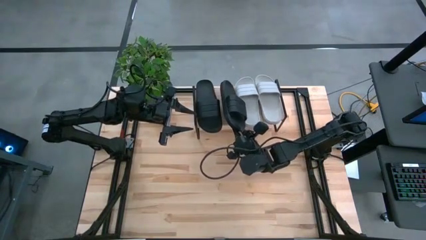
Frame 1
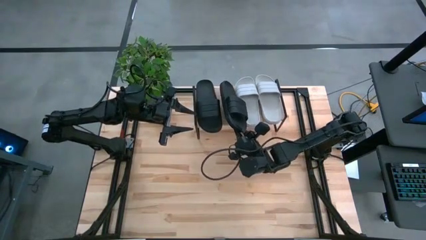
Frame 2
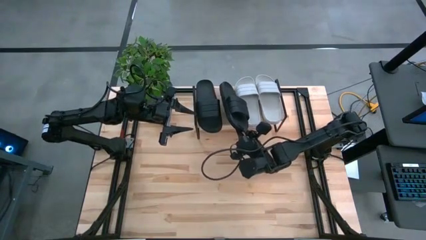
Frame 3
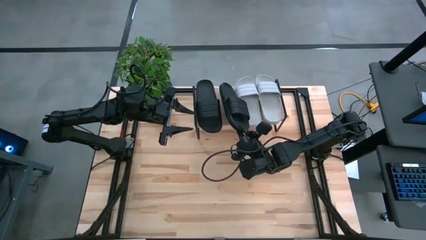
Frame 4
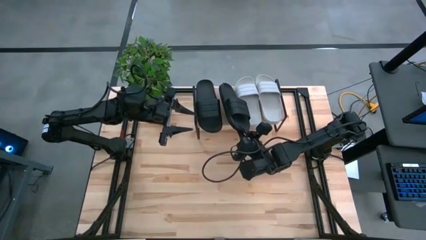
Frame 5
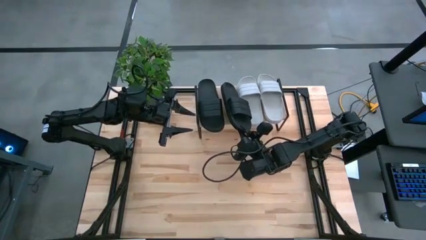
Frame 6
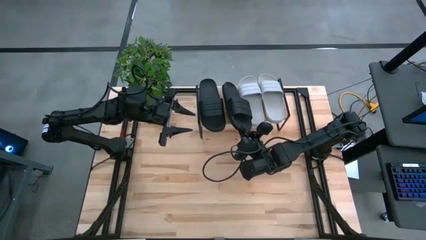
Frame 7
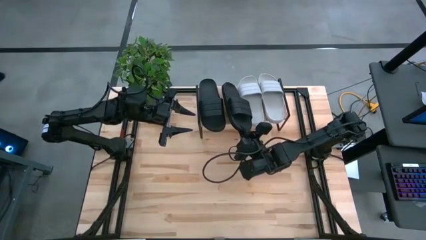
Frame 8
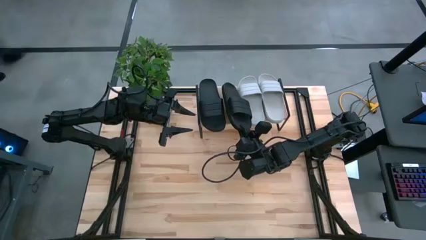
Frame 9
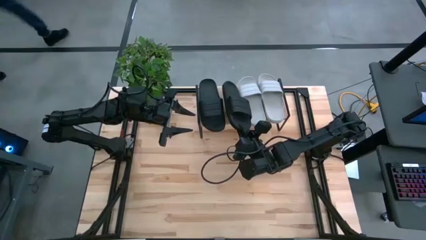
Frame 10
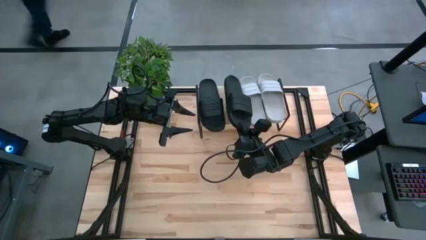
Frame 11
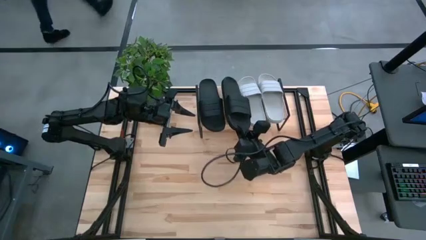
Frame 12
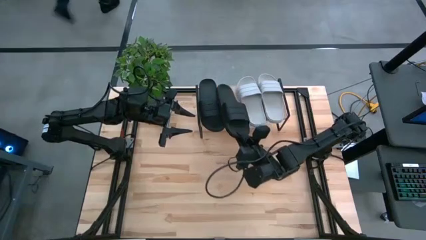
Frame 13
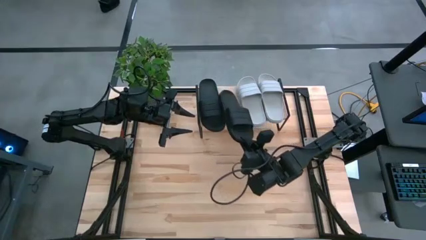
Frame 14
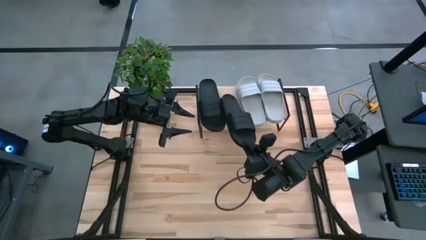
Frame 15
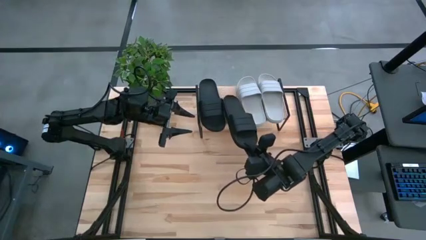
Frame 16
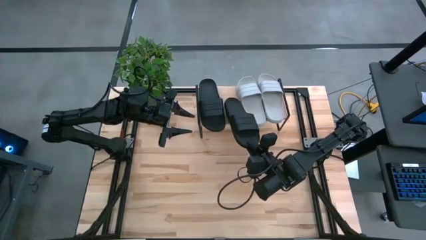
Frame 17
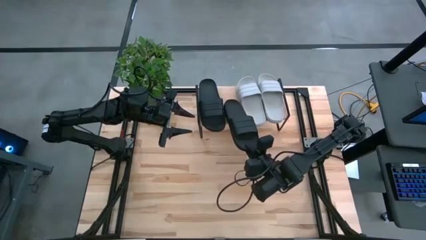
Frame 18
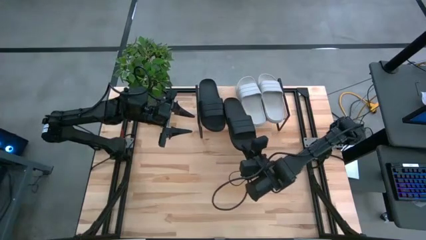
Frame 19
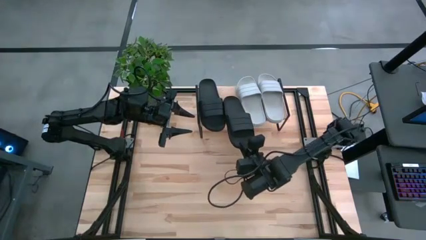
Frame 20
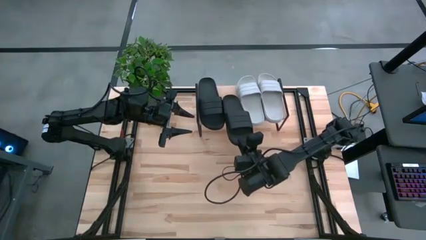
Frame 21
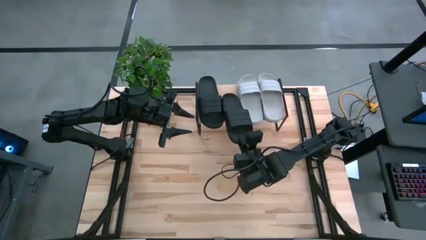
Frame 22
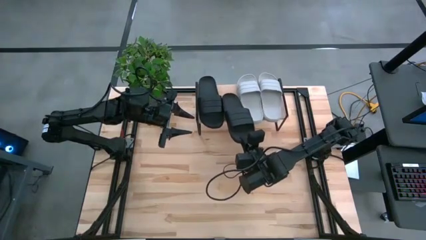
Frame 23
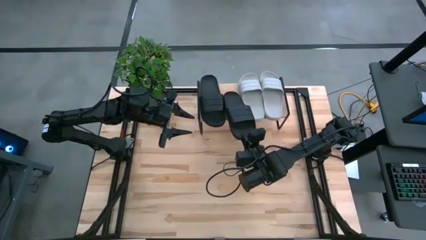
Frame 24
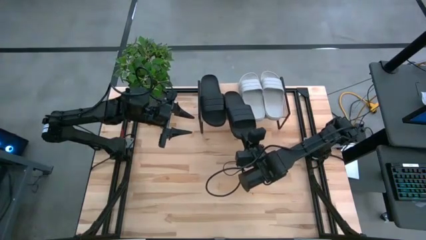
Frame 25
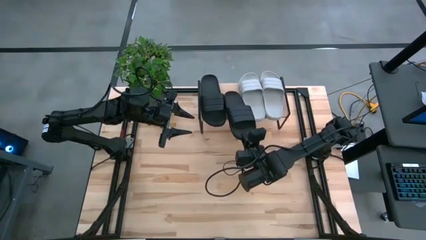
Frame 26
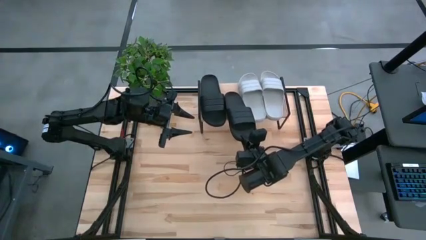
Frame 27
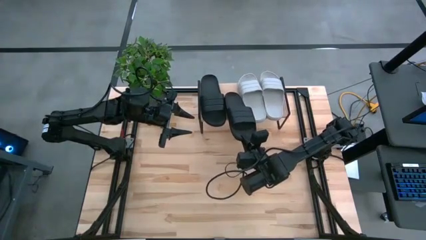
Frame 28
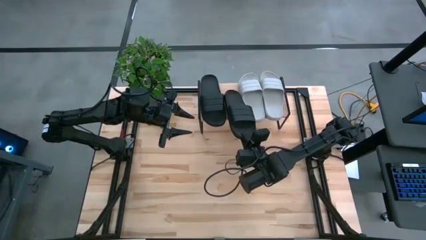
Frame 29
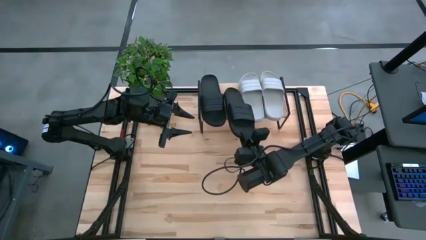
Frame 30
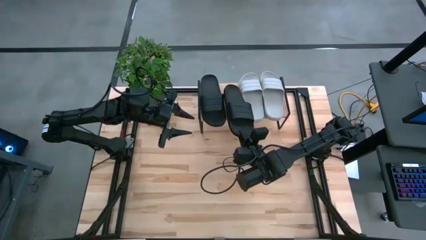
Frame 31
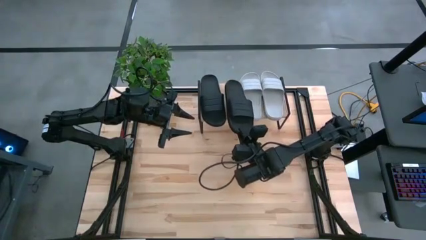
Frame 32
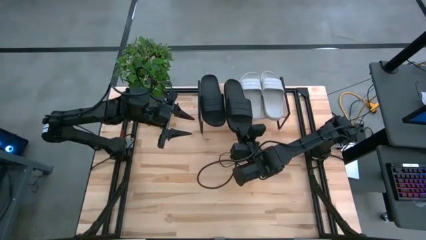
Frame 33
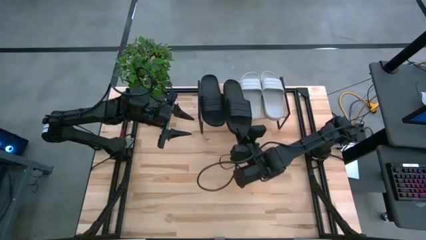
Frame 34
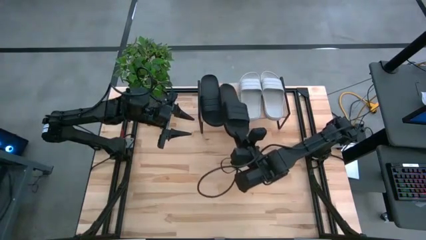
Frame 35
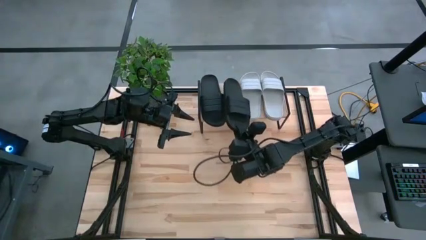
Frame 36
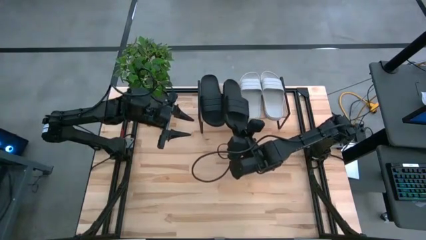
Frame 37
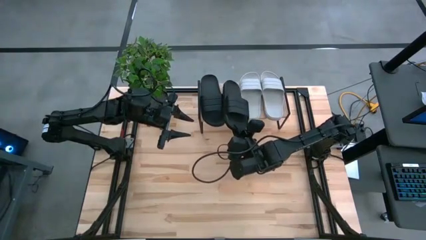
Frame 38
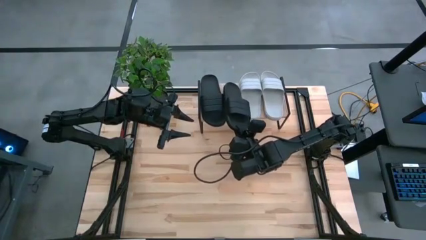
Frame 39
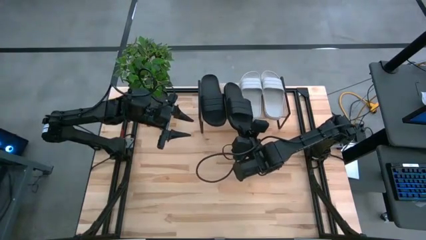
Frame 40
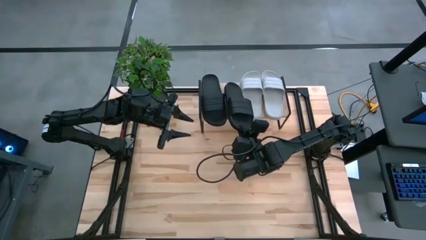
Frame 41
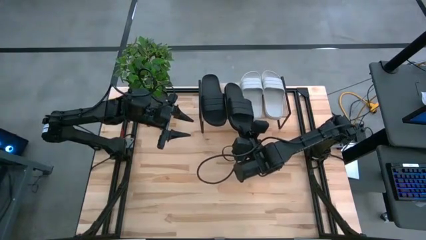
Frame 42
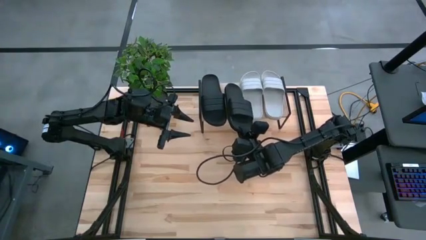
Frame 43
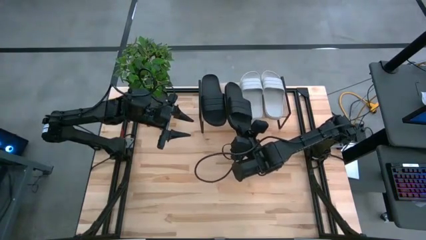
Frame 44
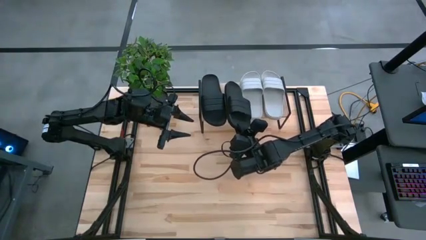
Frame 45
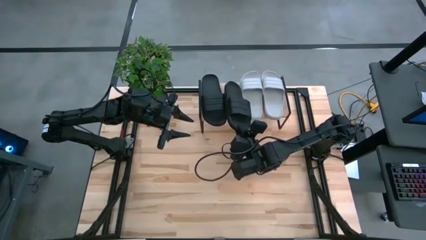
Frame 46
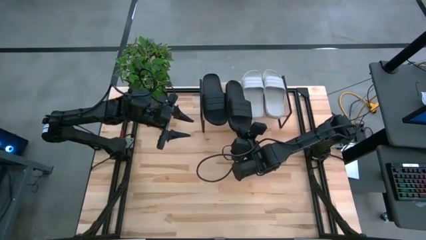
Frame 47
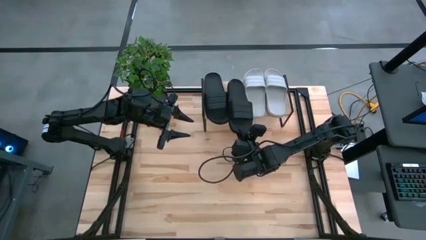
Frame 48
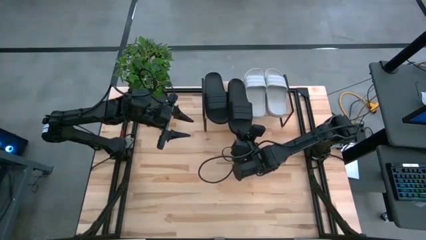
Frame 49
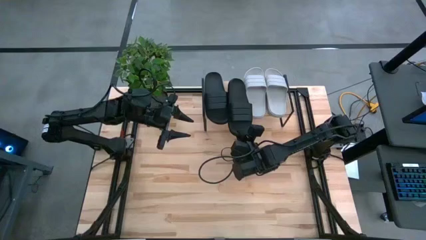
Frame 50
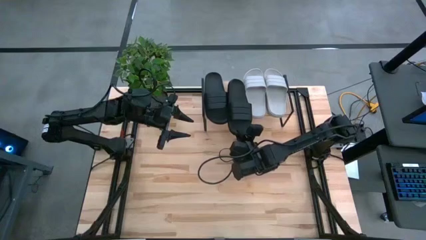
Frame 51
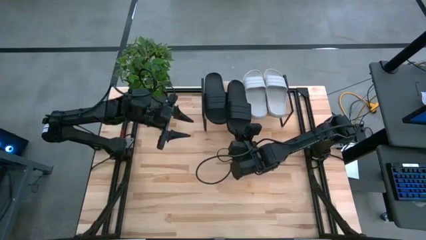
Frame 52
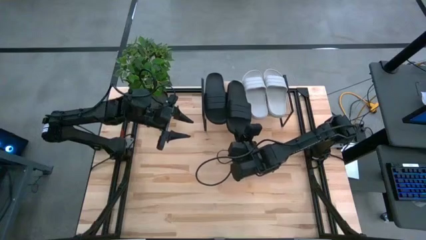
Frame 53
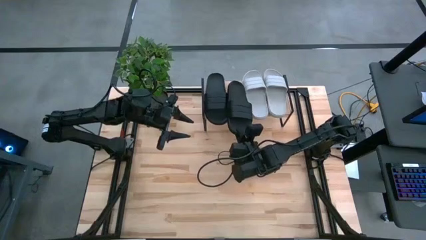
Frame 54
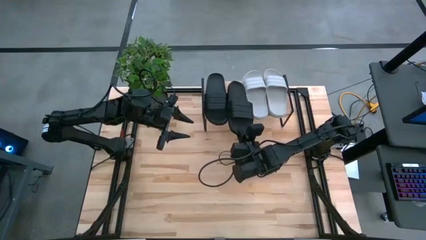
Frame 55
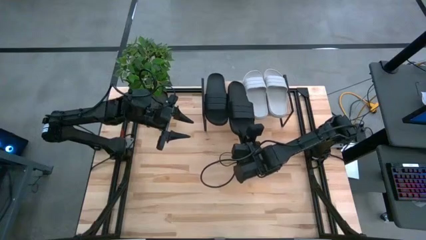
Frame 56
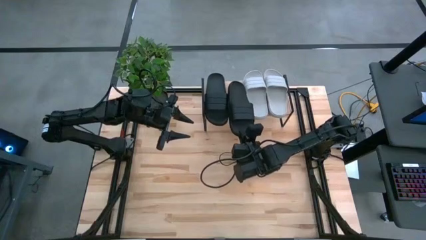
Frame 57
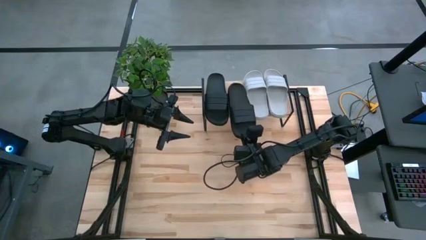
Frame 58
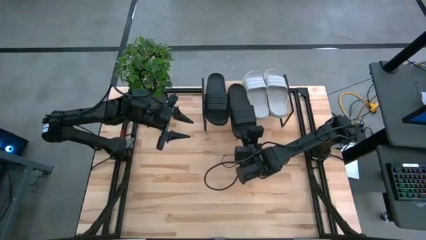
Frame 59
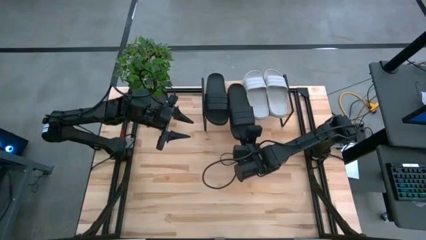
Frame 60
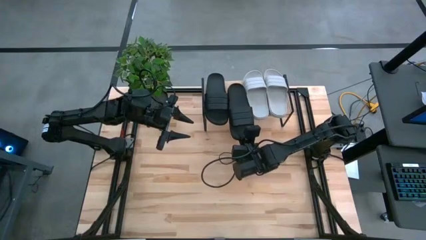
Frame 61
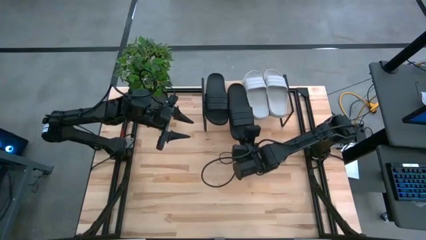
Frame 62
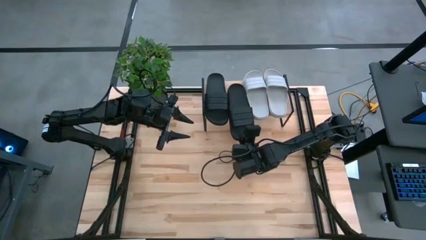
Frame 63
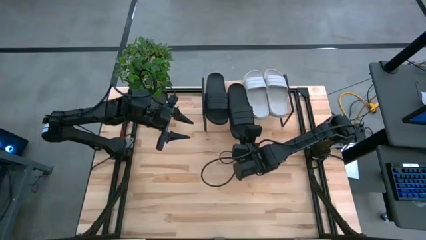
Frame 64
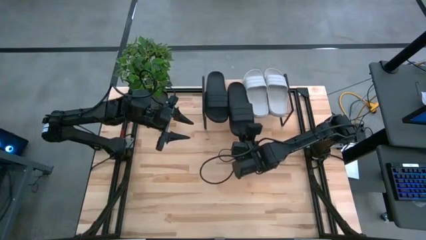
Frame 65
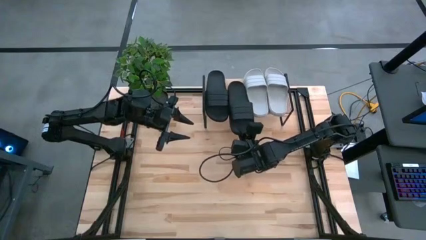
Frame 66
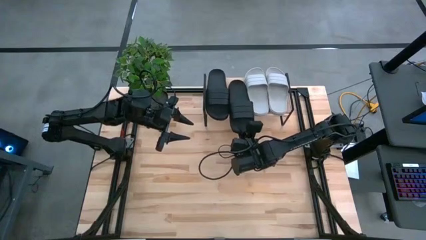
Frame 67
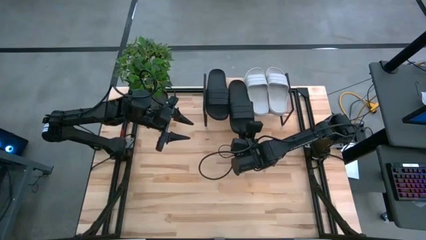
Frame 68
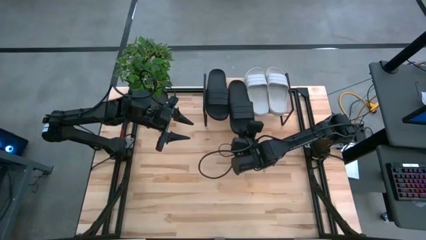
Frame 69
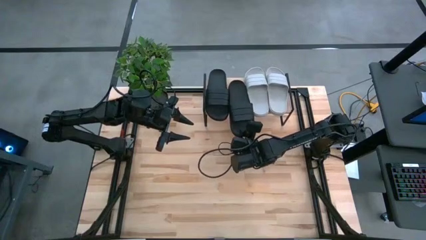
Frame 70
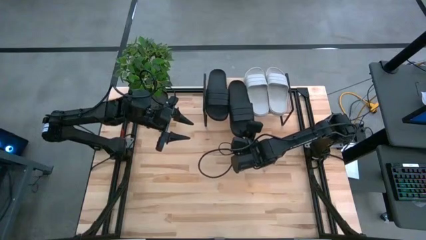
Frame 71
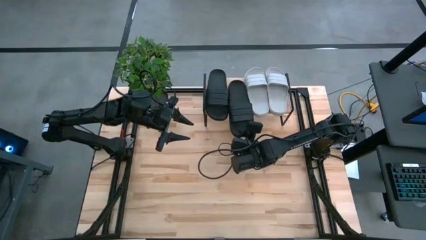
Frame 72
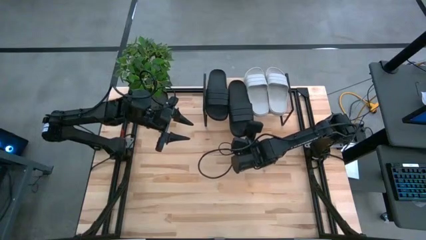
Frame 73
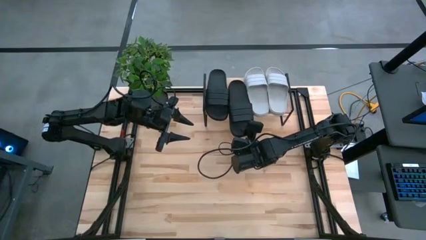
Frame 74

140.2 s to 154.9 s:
Task: Pick and place slides into the shelf
Put the black slide on the shelf

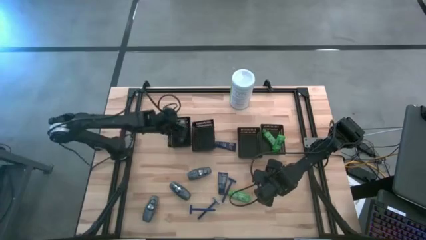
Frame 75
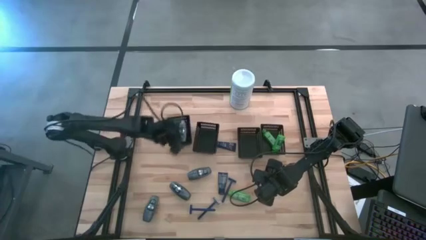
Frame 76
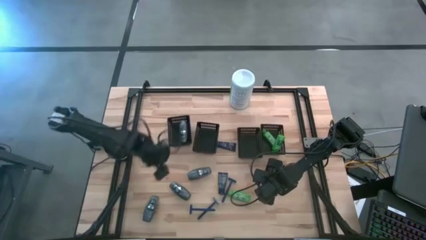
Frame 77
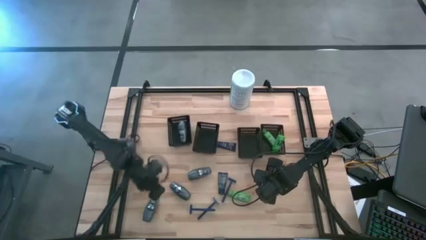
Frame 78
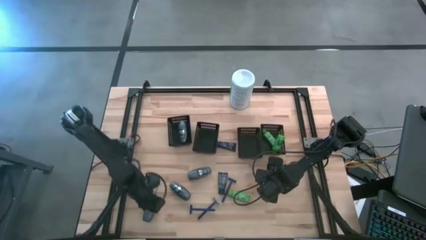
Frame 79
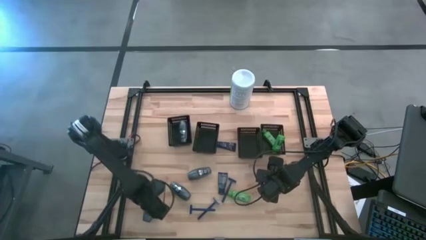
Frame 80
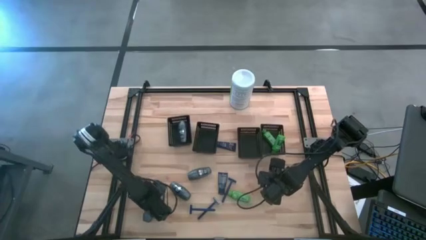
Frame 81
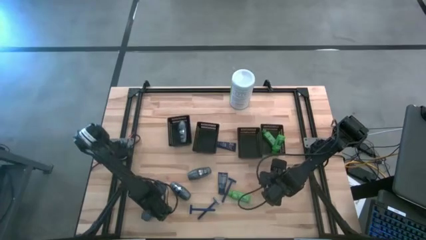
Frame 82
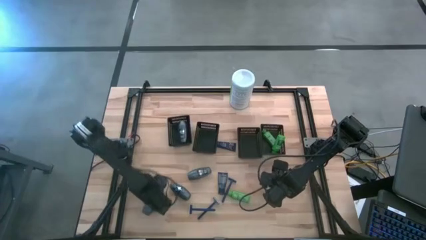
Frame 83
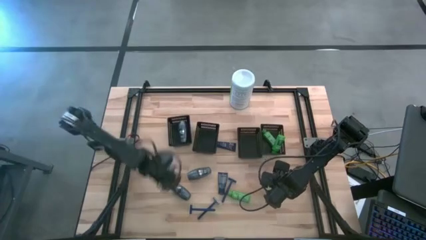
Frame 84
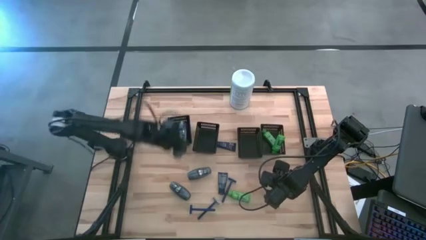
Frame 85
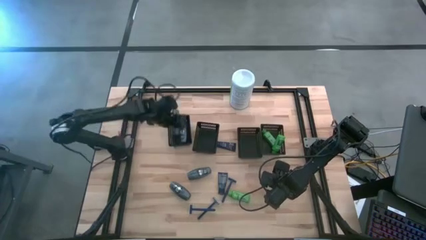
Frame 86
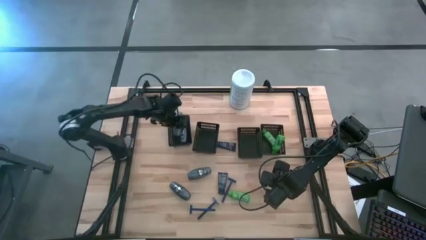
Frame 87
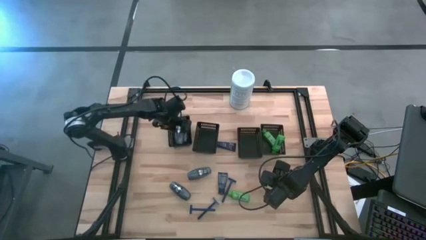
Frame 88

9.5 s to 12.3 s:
Task: Pick & Place Travel size toiletries
Put the gray deodorant into the left black bin

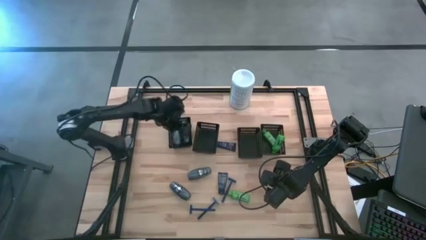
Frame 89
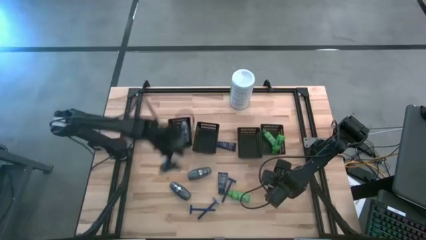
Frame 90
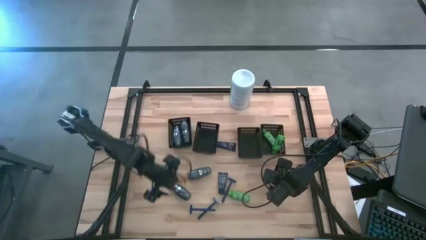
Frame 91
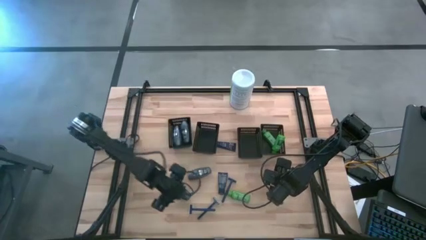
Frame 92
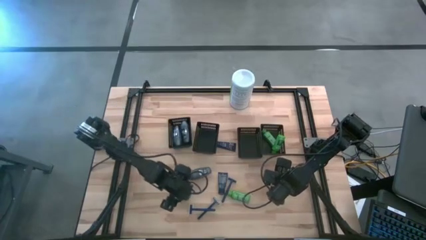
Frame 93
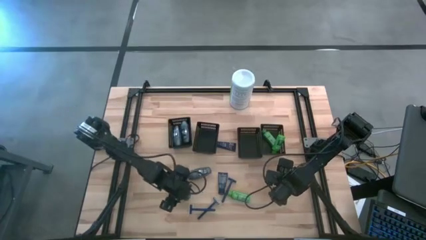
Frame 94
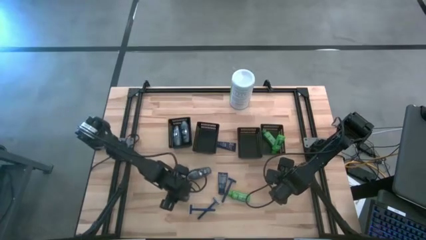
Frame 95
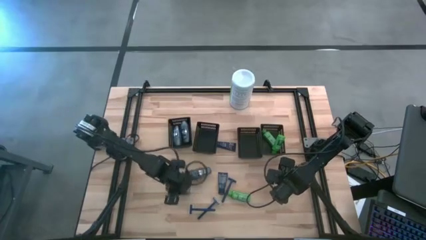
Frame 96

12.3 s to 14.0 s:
Put the gray deodorant into the left black bin
